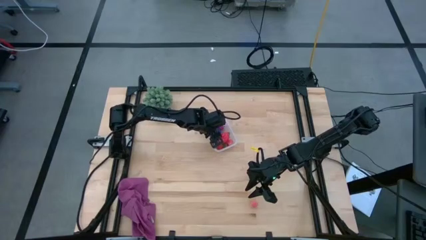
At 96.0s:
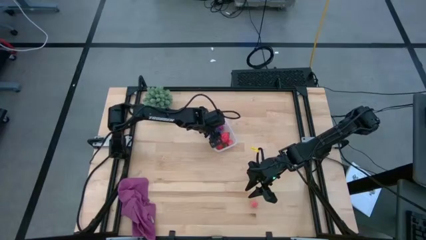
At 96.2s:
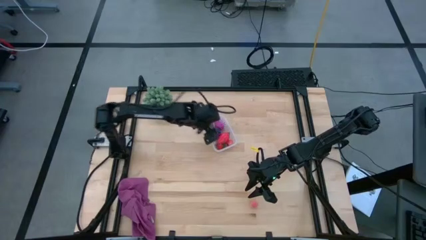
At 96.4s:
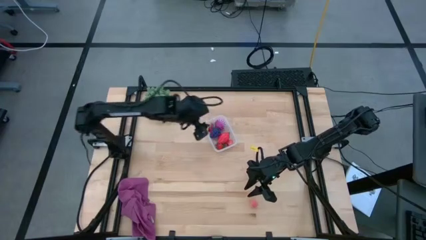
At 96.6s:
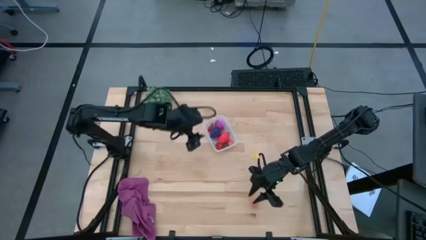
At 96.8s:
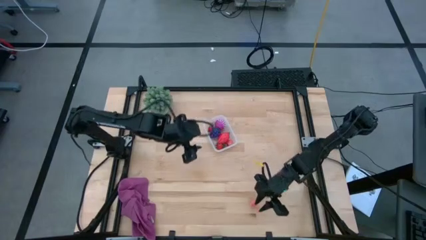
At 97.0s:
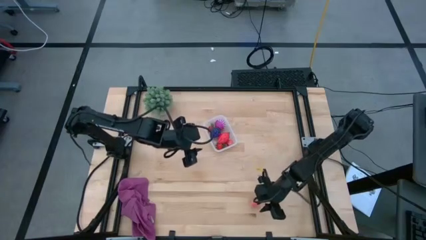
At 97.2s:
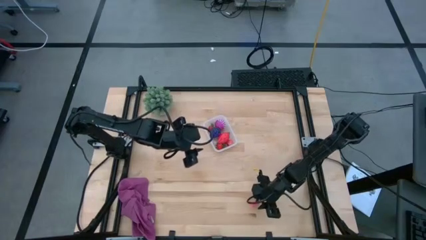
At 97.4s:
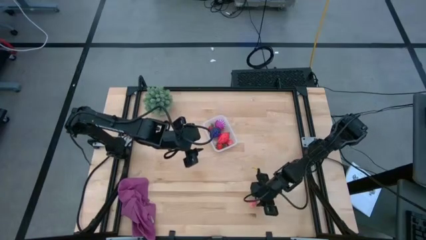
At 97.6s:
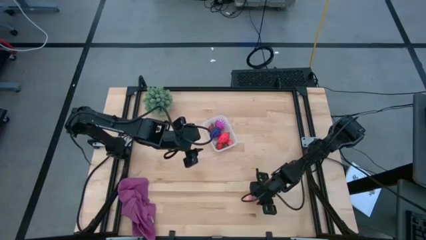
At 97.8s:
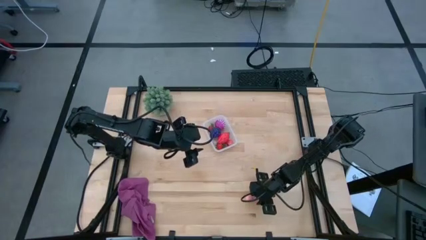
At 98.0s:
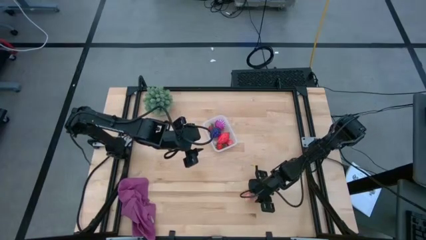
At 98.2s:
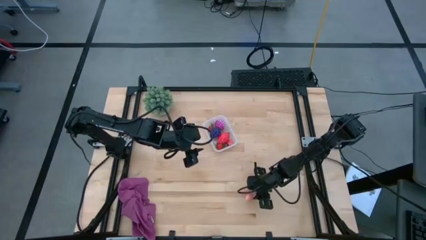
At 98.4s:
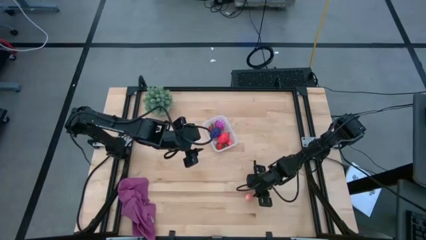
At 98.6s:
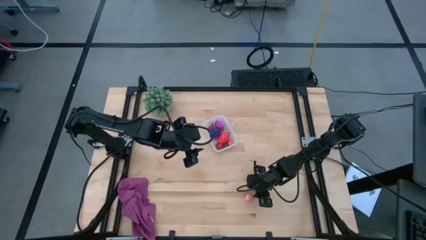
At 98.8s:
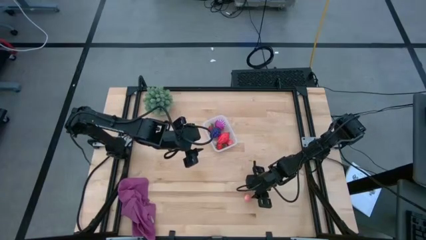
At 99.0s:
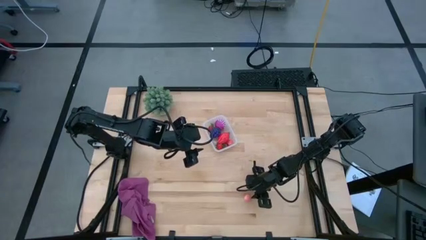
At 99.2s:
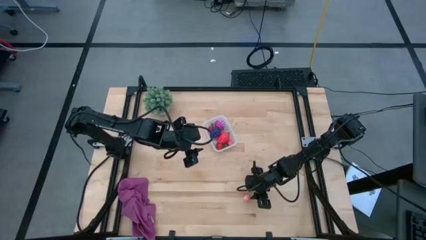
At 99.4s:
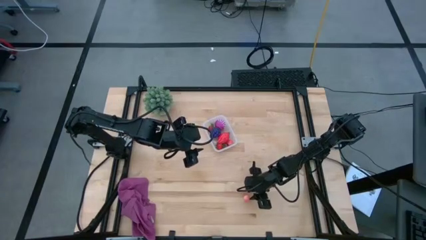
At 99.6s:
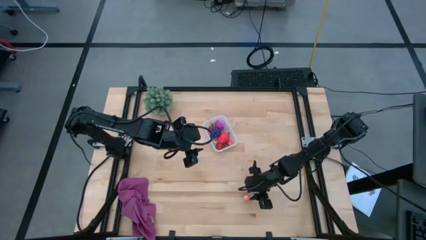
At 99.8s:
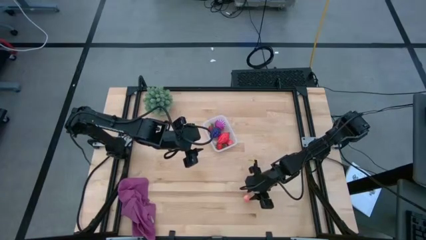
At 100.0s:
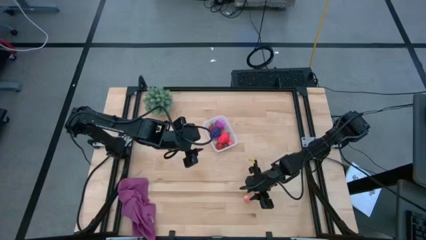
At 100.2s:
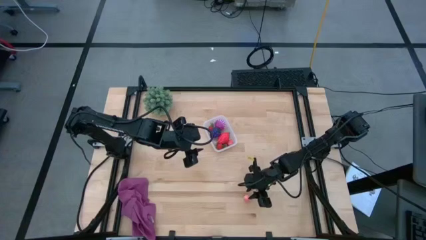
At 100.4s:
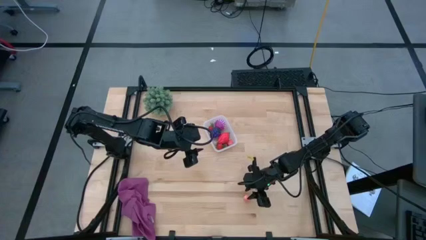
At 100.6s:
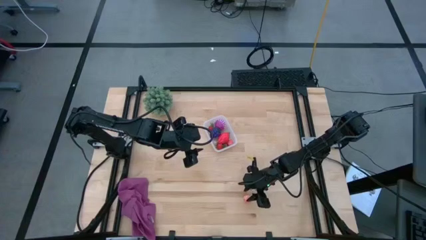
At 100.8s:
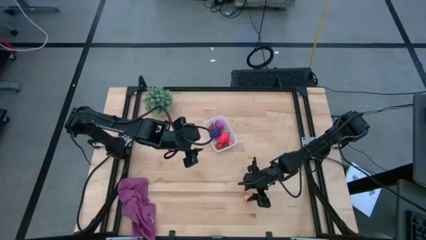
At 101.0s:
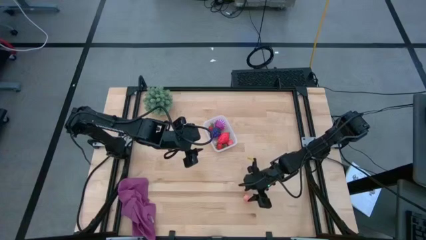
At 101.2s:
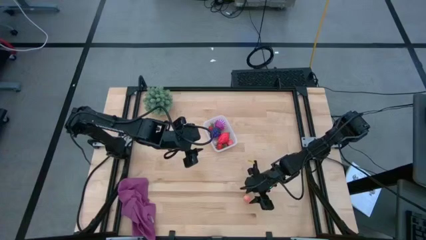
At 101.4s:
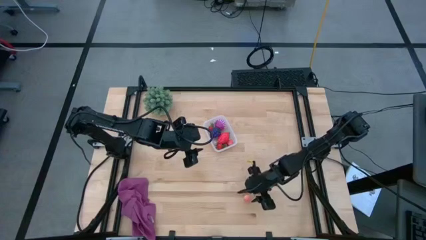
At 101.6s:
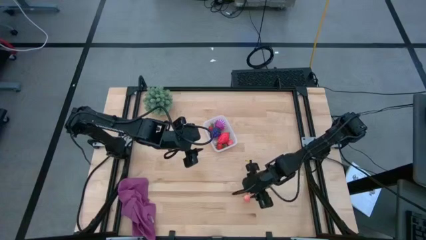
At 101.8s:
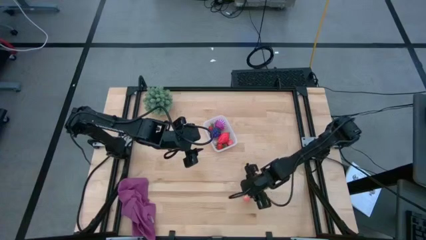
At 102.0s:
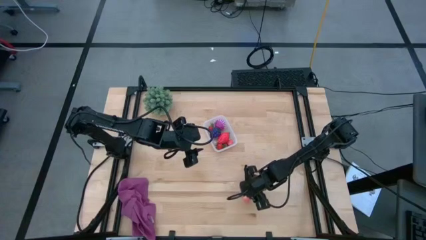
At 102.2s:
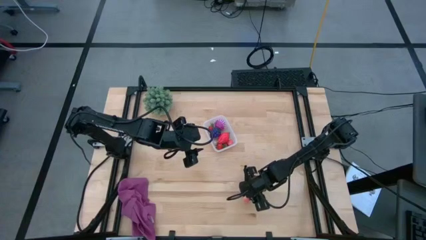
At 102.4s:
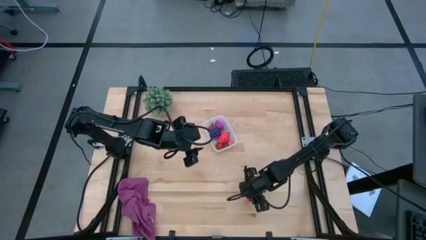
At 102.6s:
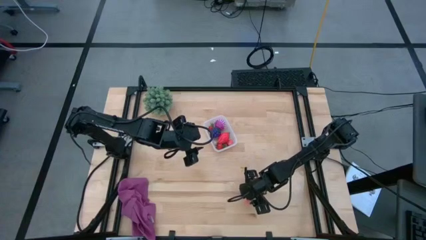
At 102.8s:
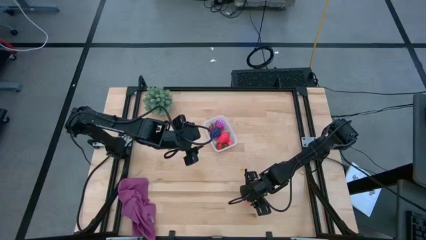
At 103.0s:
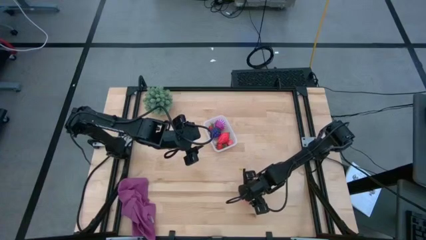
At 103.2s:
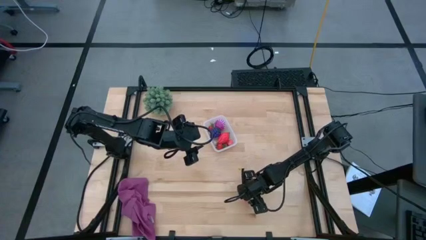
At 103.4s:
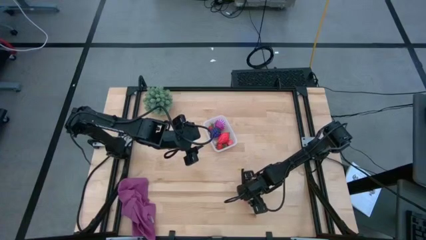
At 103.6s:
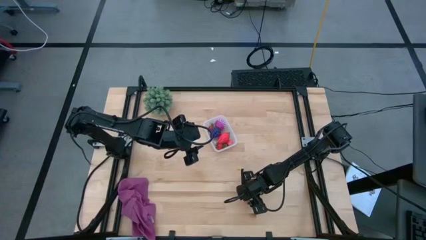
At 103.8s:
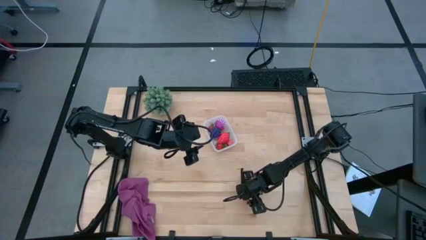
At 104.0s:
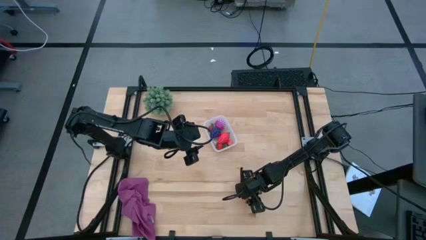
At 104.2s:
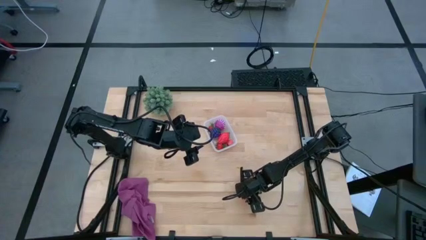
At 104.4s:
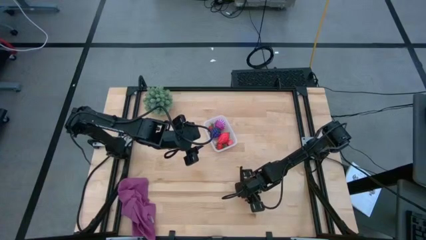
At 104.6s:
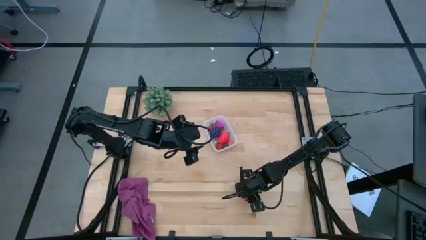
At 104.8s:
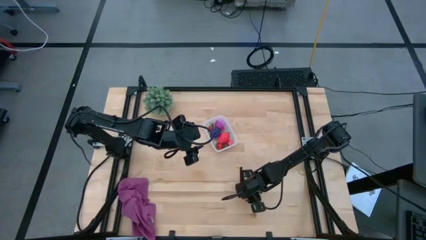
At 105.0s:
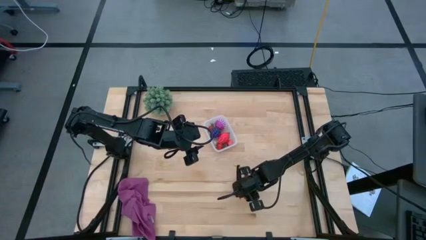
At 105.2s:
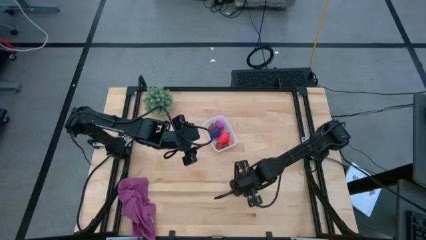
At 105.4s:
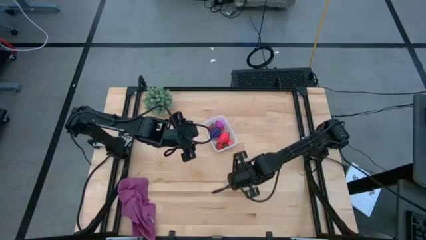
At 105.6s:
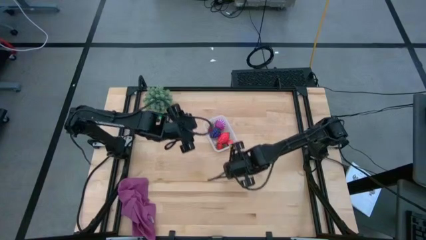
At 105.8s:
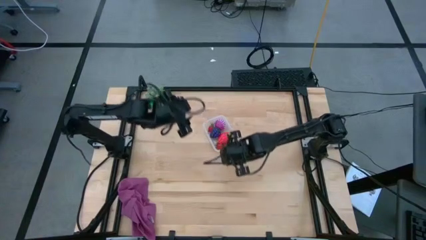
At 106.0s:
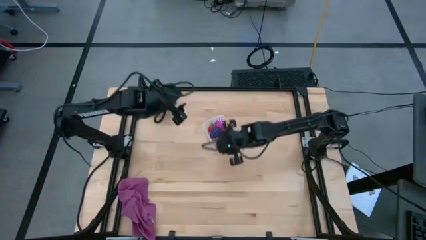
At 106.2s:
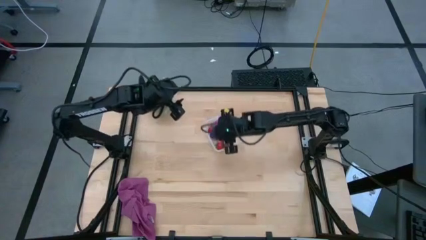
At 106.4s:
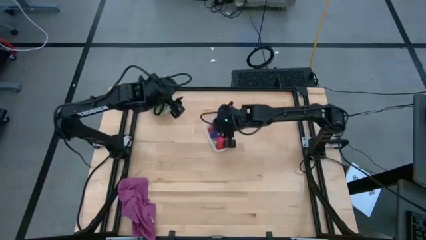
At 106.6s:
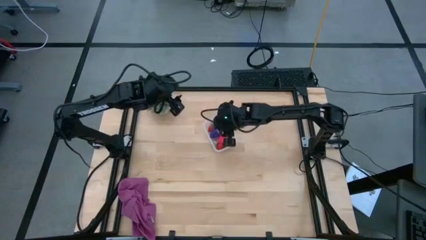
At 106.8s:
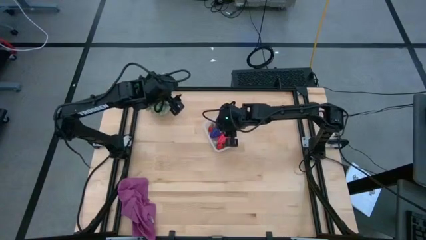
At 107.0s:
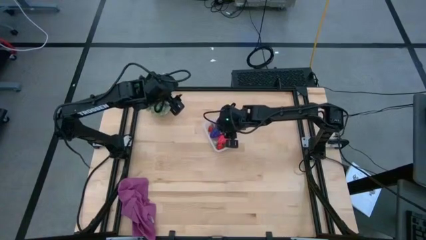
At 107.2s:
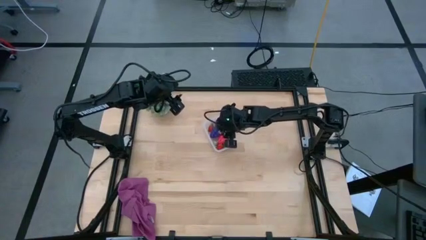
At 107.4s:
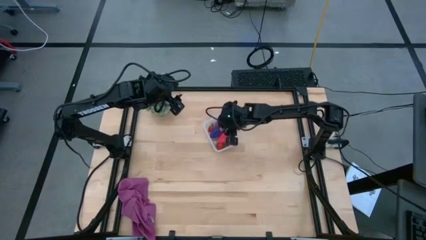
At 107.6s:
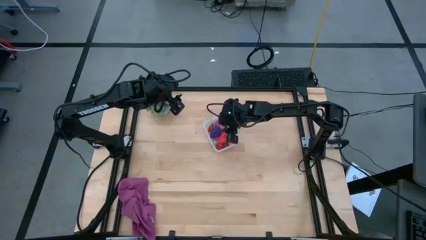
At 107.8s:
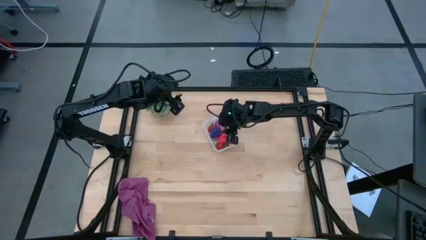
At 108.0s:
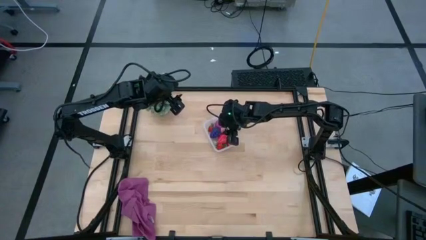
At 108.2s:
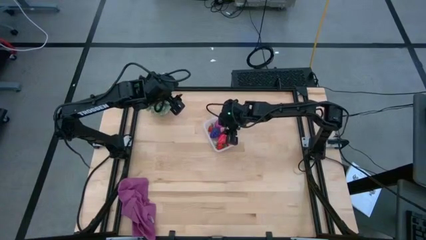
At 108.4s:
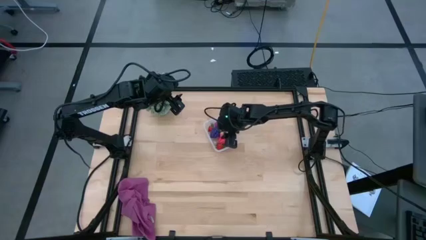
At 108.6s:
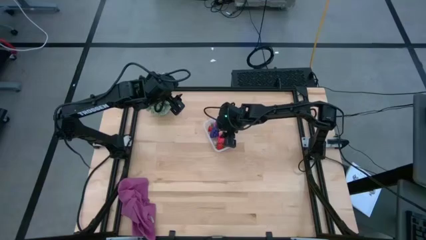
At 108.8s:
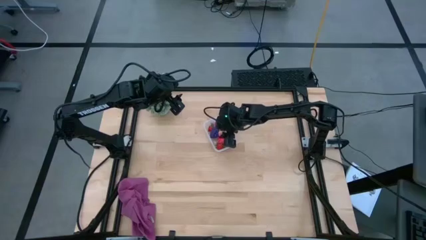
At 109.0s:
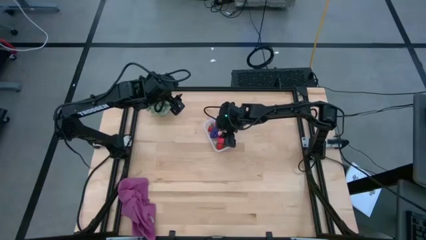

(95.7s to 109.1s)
Task: Pick and placing Produce into tupperware
Put the peach into the transparent bin

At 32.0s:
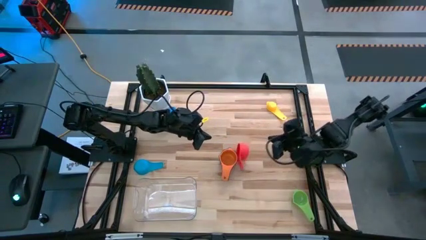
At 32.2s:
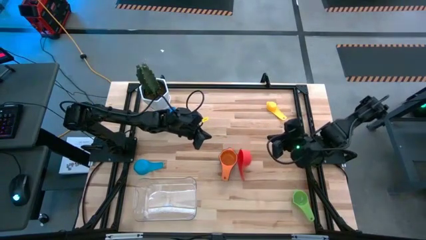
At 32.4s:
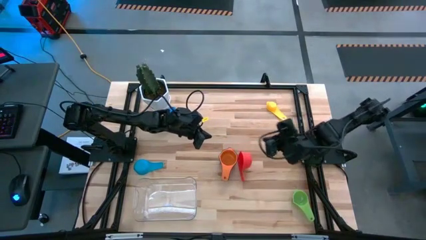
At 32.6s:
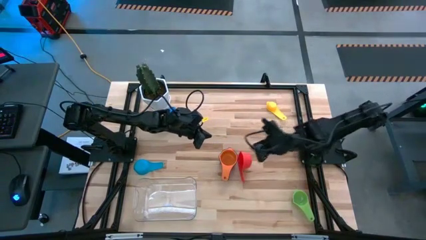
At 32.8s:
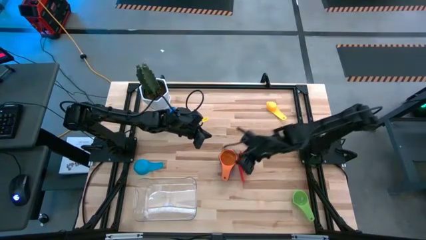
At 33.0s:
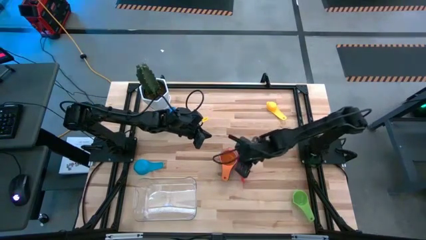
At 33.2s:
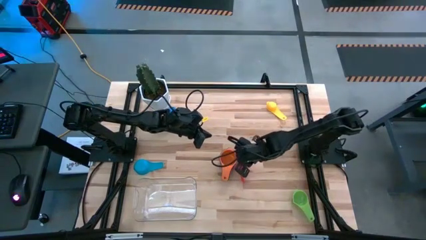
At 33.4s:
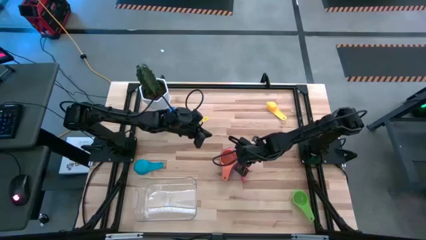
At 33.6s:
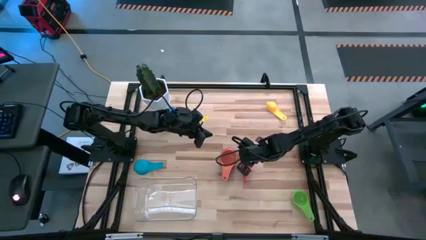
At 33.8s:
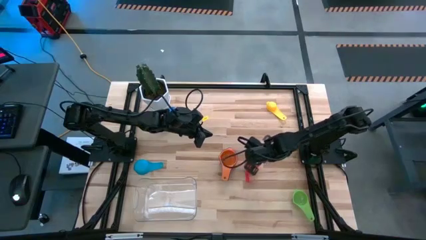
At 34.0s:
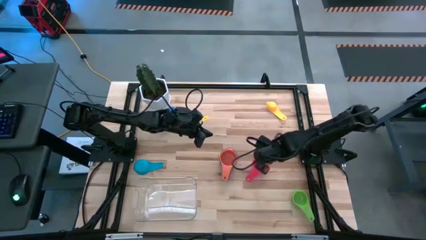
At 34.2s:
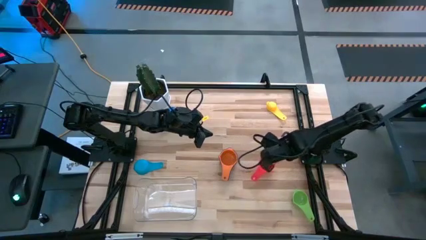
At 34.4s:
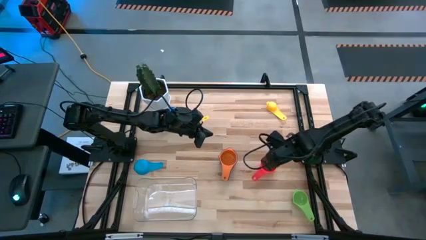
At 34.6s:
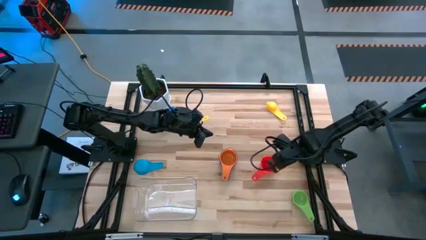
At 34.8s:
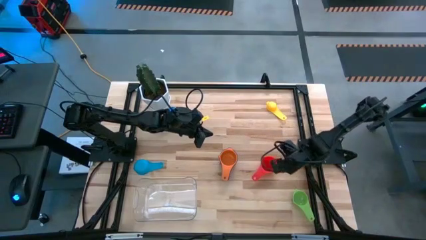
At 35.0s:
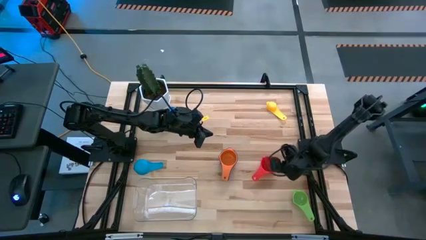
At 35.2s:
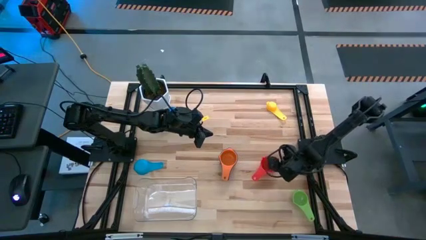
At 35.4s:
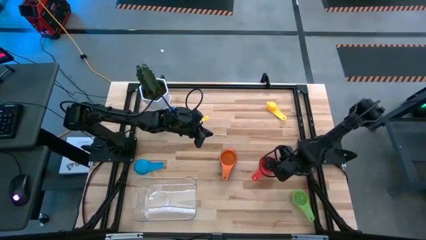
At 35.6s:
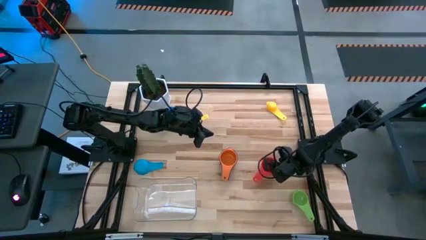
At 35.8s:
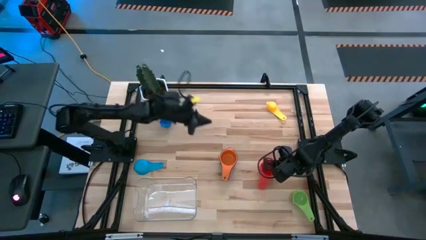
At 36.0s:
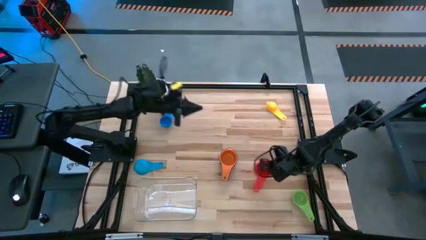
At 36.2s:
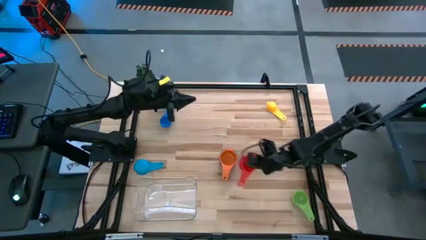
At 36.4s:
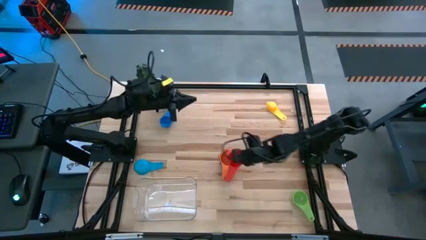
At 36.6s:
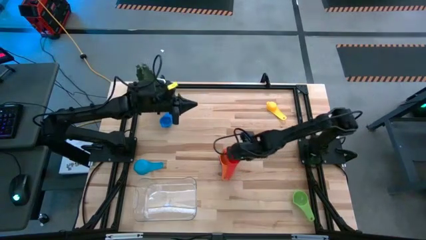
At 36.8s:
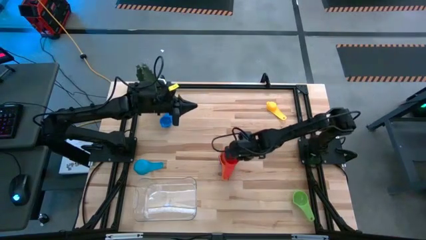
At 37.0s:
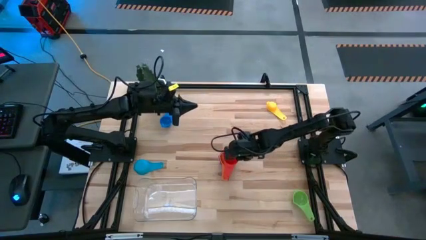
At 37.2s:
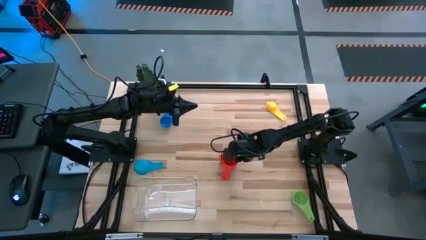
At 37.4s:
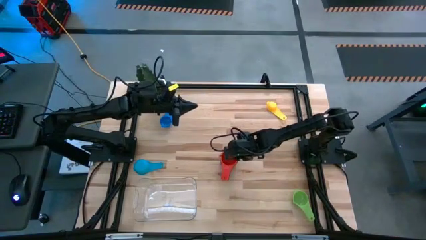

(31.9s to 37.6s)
Task: Nest measuring cups in basket
Stack the red measuring cup on top of the orange measuring cup
